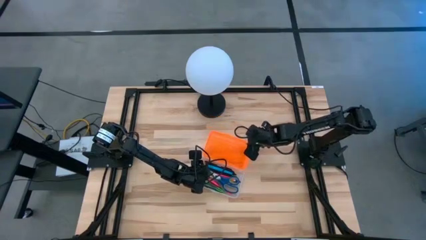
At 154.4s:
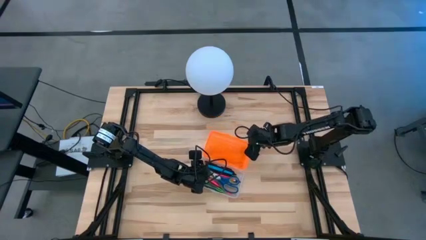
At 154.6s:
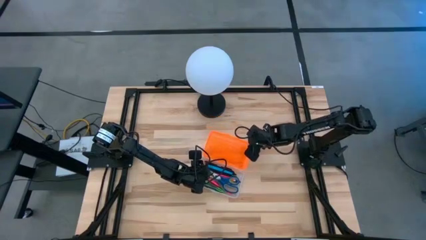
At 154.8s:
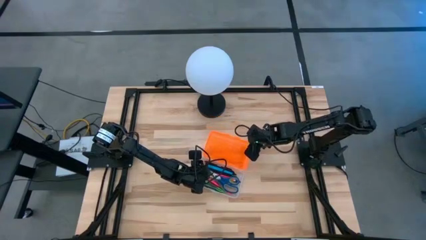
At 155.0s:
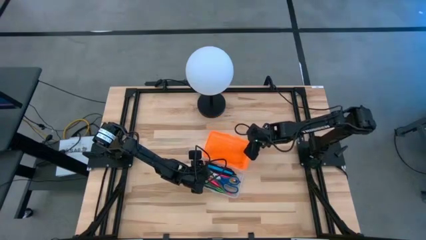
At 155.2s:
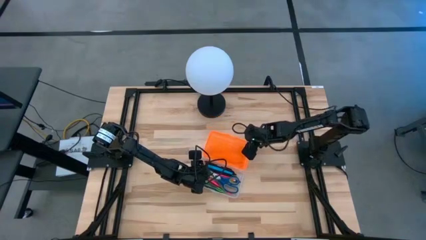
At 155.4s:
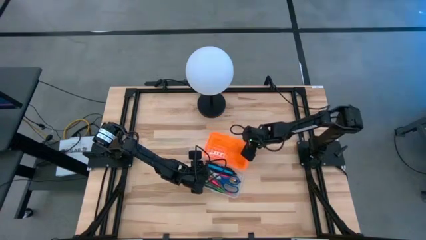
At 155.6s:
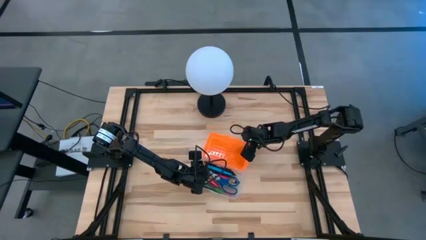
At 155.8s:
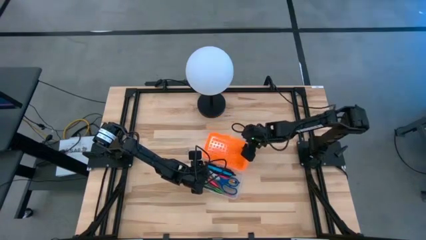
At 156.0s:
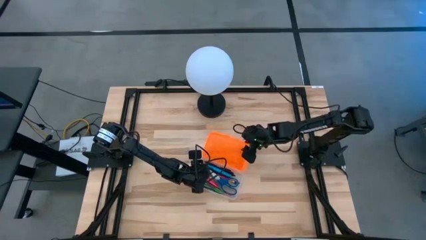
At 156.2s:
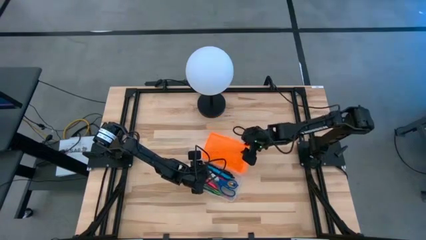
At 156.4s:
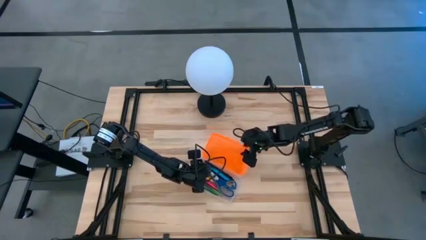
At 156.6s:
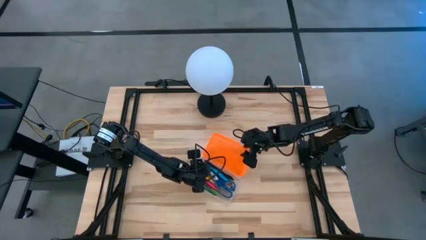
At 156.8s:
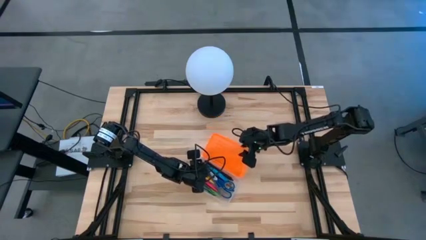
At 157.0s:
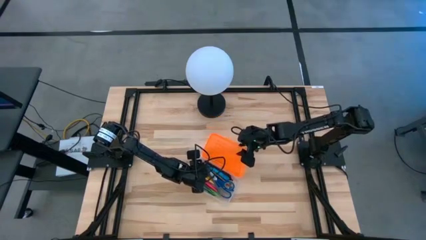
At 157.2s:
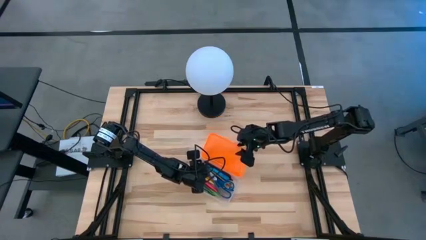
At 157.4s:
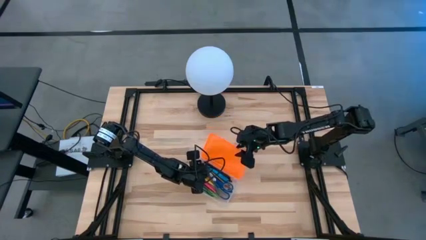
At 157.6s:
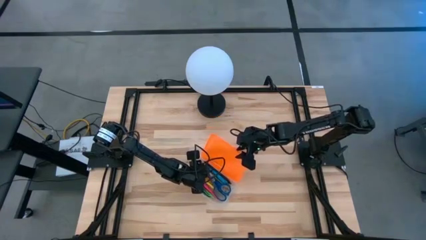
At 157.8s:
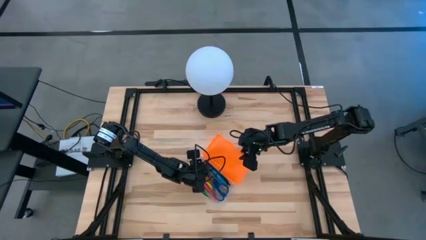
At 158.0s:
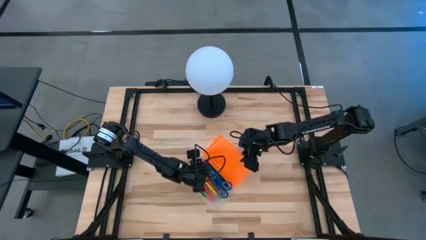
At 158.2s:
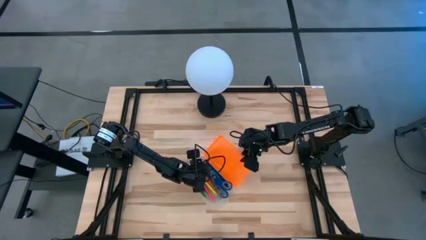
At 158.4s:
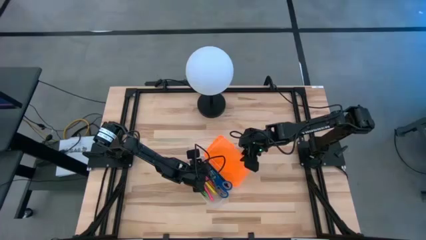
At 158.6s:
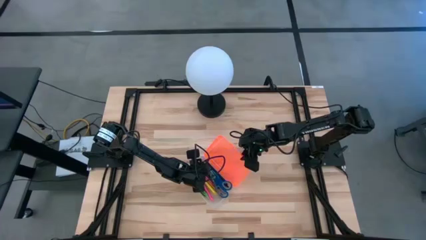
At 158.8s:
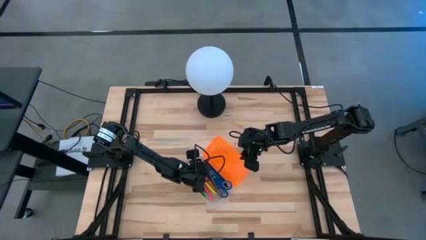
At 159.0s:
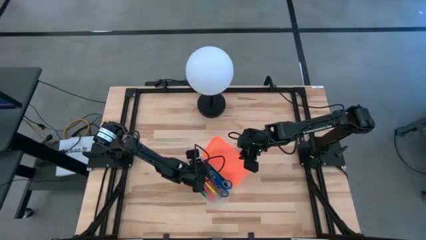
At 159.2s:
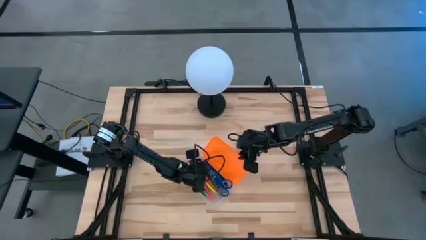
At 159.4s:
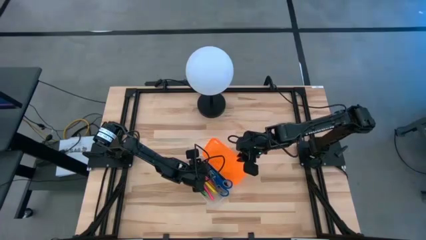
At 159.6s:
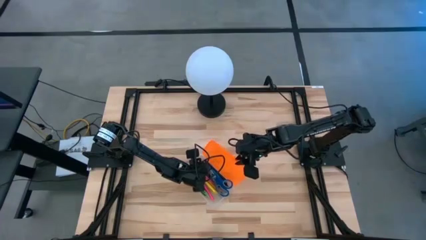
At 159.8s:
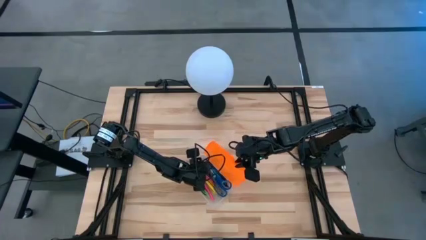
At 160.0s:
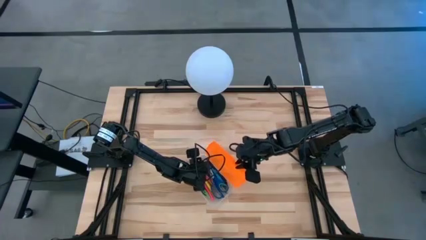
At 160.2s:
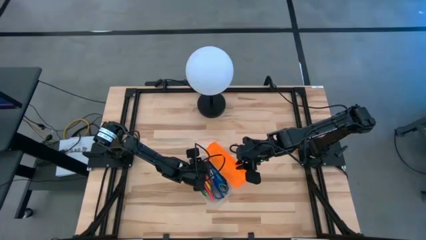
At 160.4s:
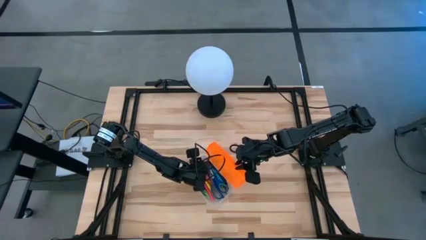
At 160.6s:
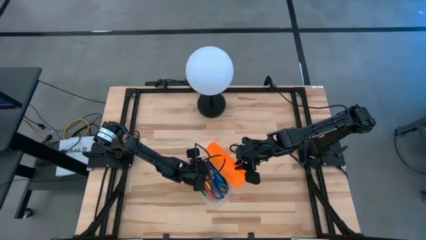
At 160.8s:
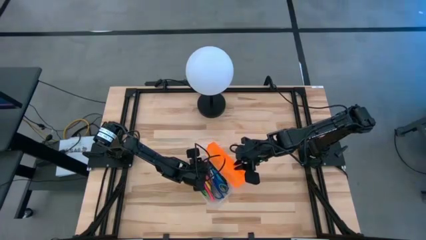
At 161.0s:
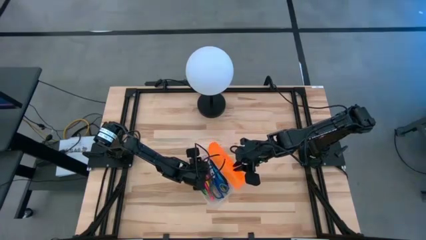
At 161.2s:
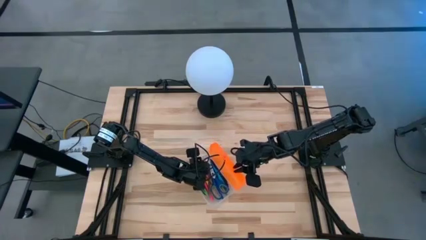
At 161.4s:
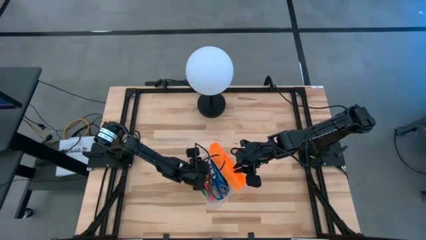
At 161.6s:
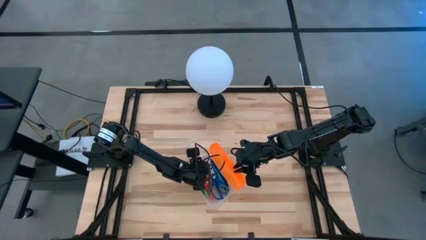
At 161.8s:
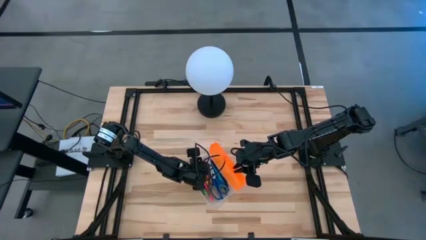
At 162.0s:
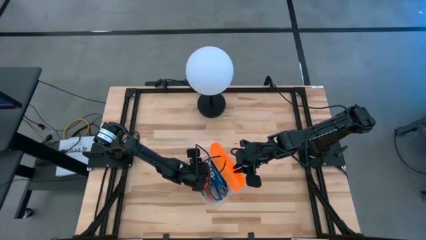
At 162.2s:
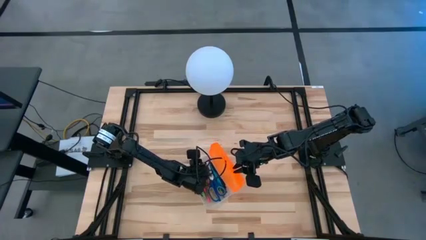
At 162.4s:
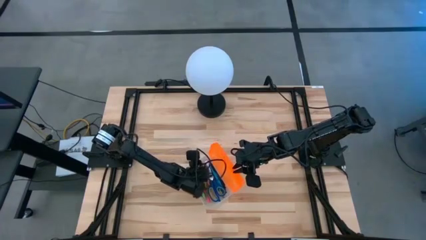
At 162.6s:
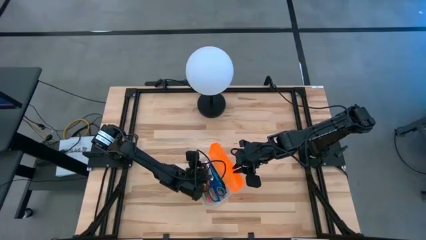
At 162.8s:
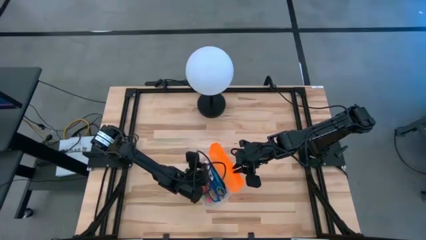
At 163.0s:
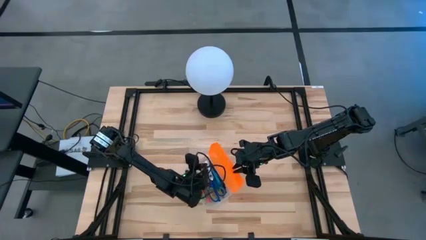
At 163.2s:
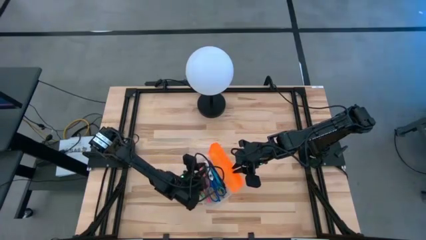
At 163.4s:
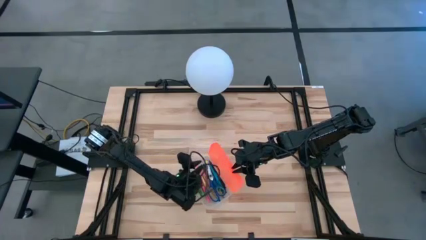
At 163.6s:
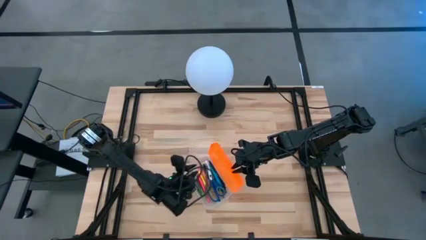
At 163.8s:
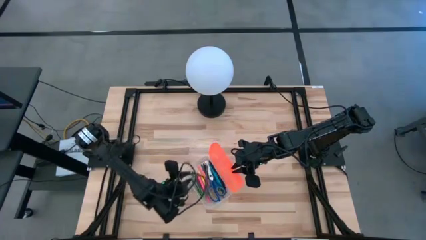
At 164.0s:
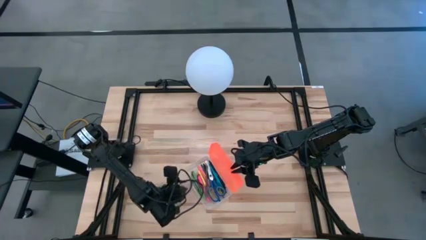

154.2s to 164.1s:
Task: Pick & place school supplies into a supply box
Close the orange supply box

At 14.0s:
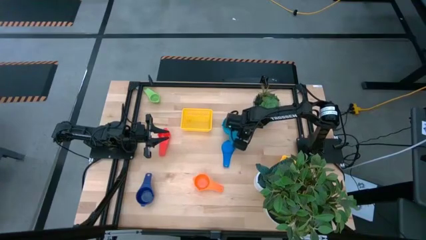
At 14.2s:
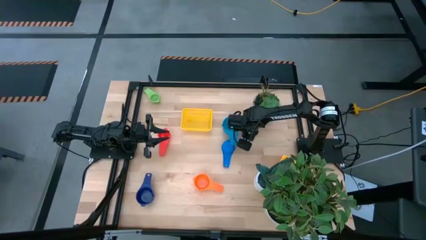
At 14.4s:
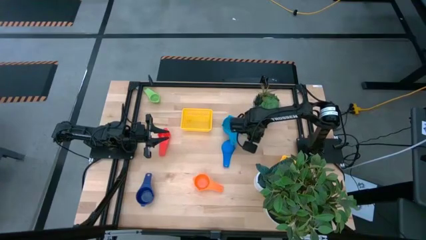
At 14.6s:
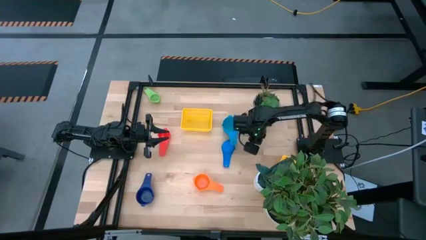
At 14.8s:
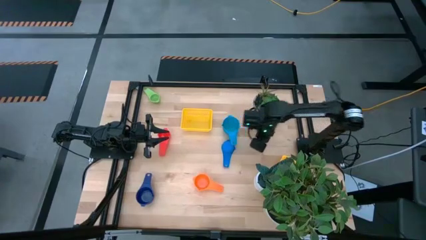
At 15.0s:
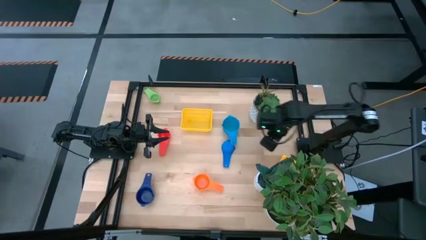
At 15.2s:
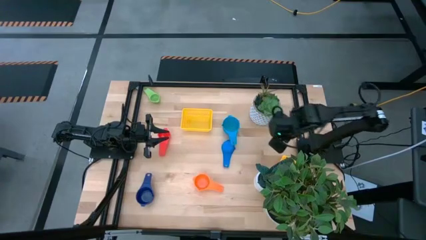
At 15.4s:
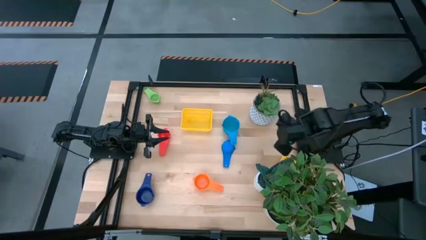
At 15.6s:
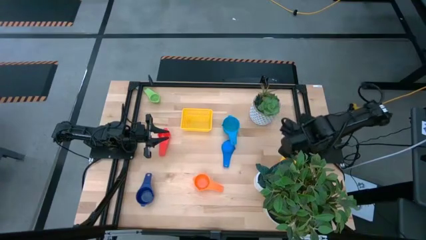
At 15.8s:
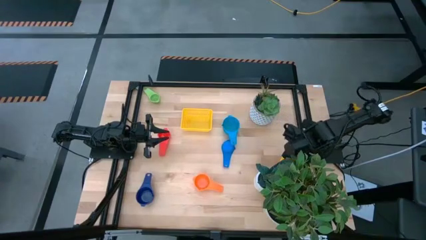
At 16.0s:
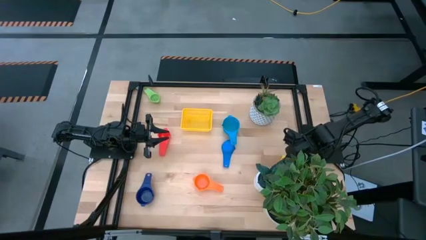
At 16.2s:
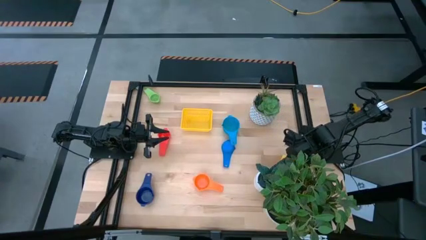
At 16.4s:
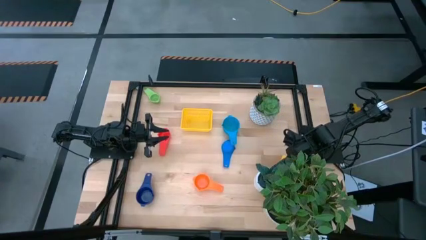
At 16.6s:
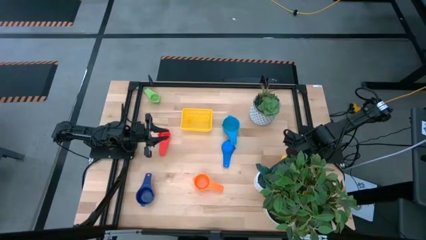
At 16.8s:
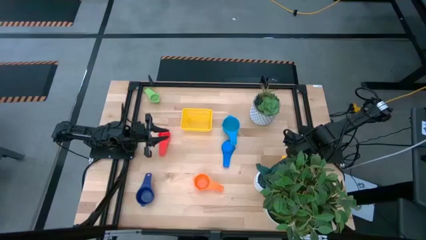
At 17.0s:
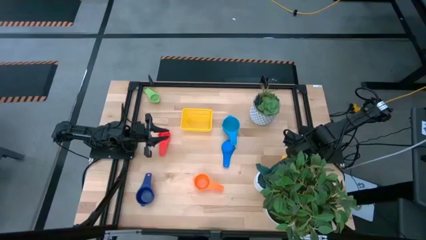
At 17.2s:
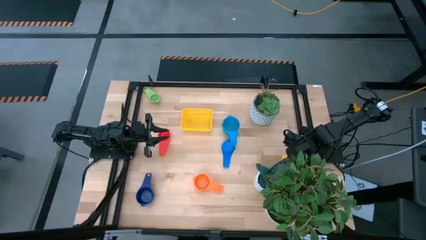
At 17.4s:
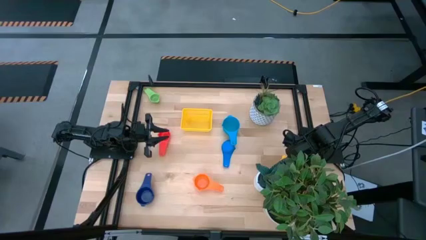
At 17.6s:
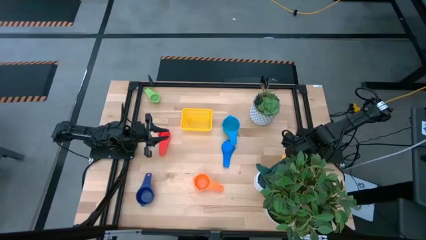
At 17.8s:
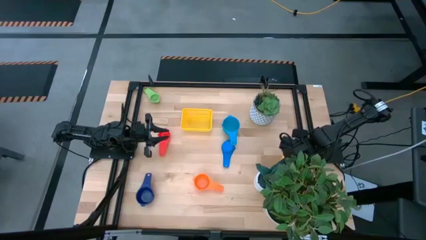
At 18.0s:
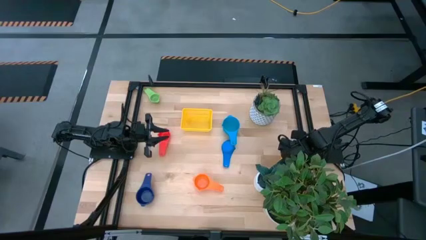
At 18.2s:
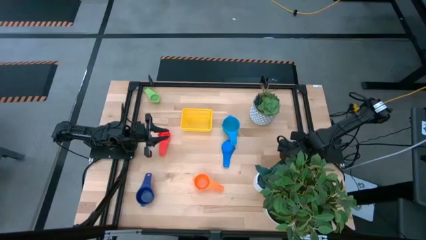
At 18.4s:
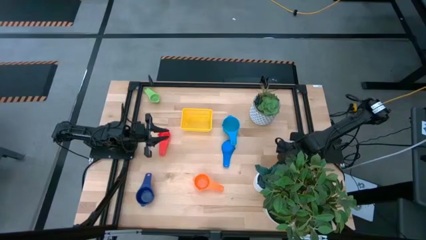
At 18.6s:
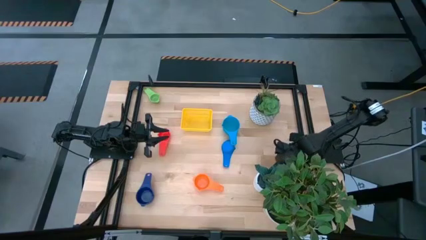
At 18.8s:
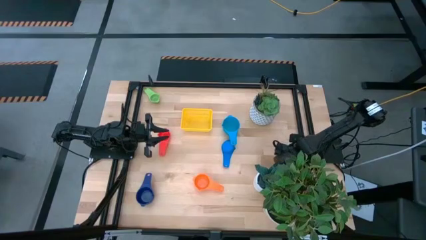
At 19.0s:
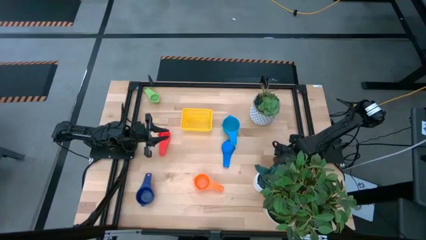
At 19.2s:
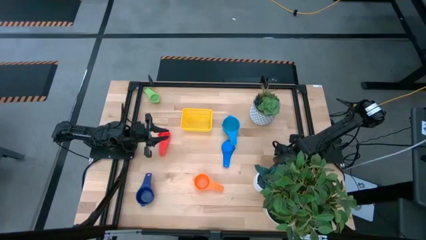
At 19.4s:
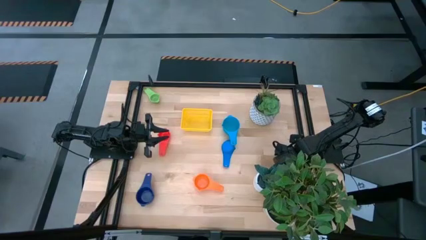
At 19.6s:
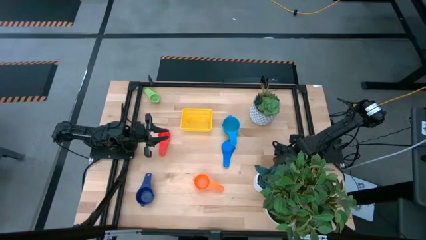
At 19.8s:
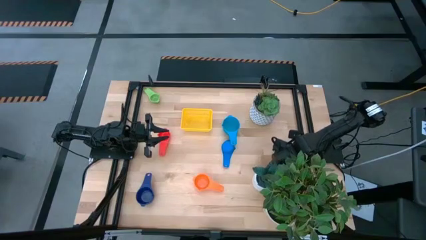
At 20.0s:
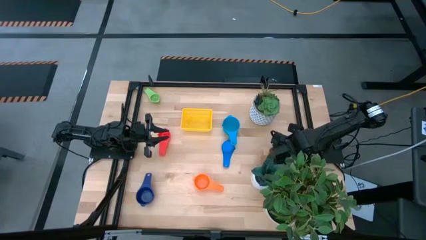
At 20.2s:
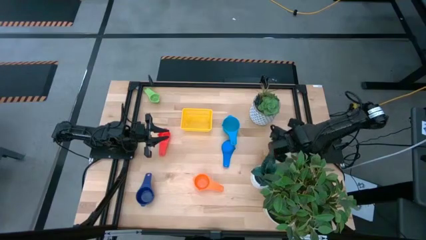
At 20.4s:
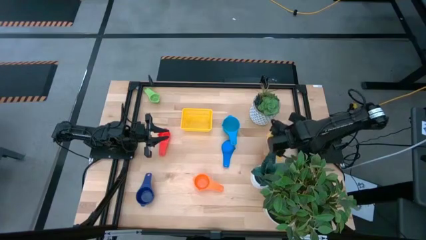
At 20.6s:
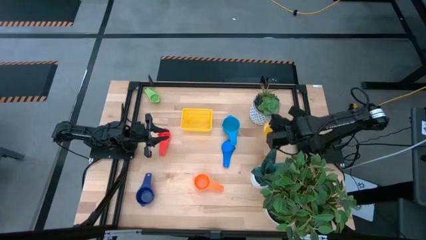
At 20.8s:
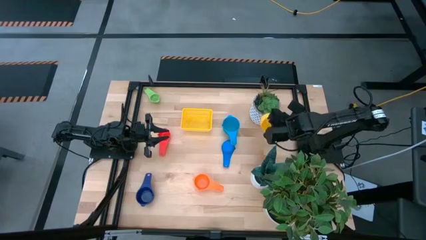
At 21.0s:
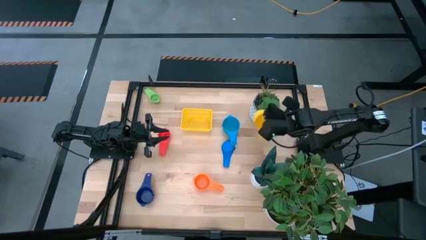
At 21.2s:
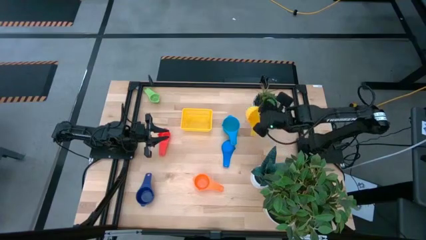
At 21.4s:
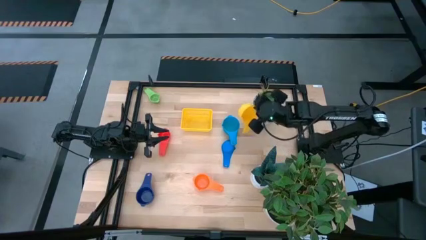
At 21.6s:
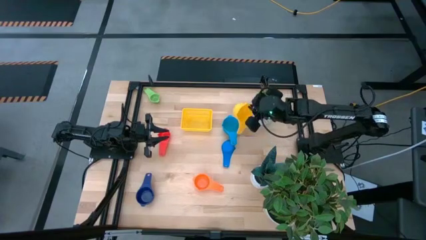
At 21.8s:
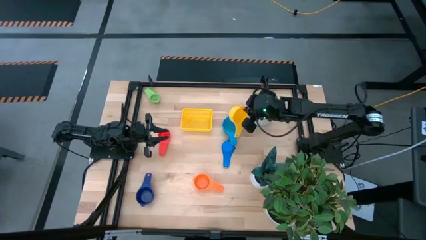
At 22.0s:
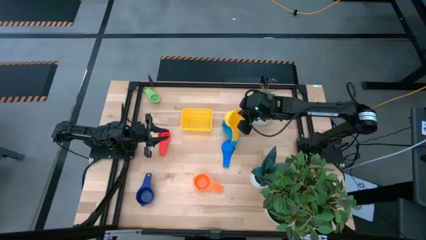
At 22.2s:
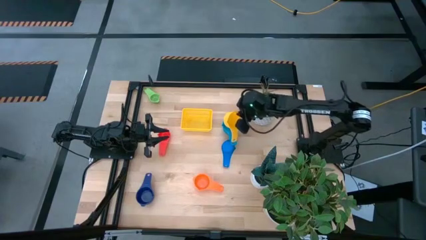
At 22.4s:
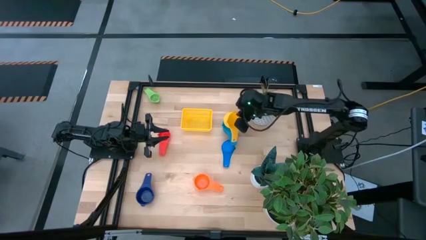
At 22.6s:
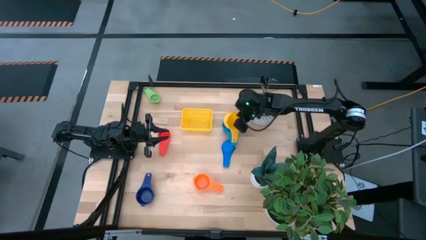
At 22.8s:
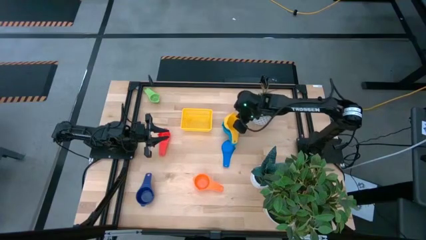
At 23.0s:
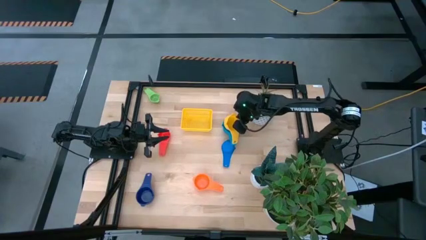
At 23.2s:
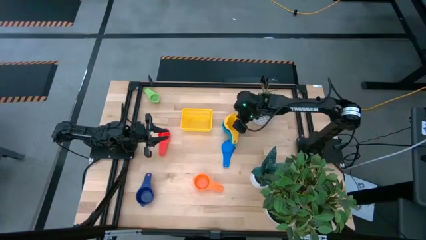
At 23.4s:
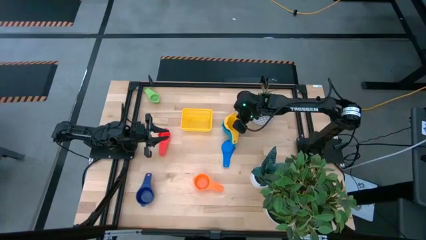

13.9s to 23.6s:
Task: Nest measuring cups in basket
Stack the yellow measuring cup into the top light blue measuring cup
